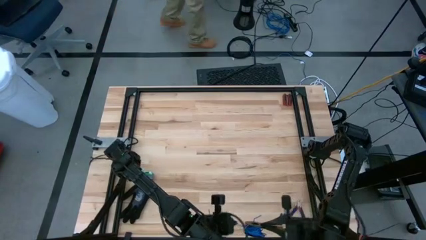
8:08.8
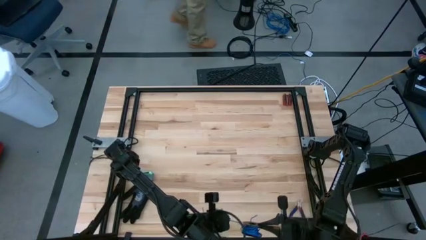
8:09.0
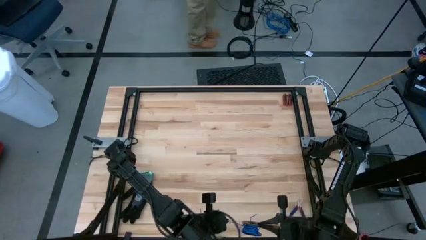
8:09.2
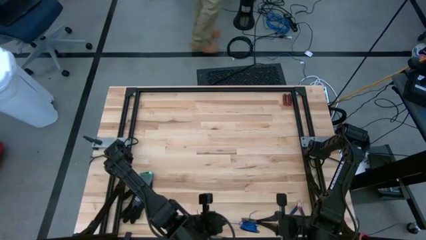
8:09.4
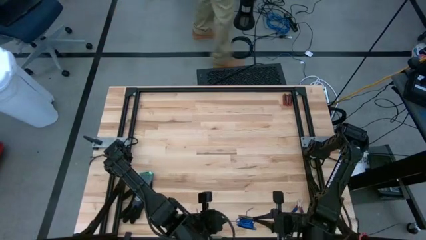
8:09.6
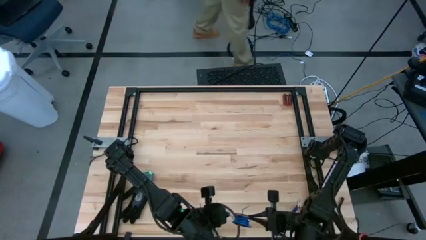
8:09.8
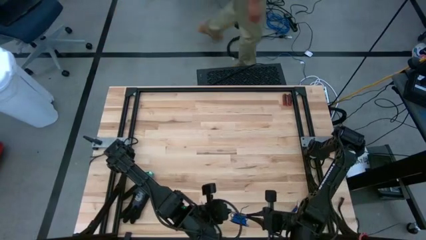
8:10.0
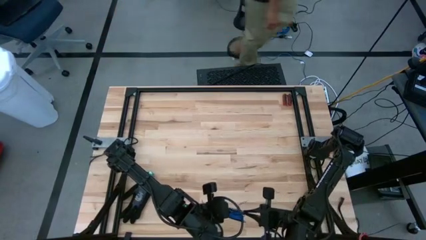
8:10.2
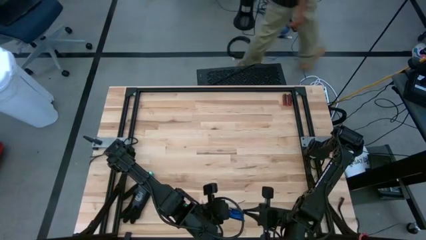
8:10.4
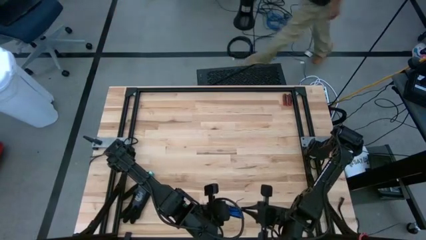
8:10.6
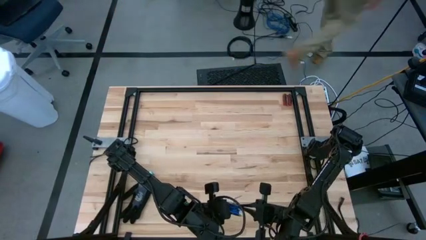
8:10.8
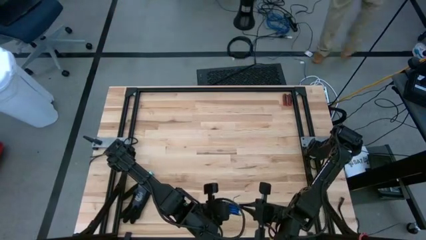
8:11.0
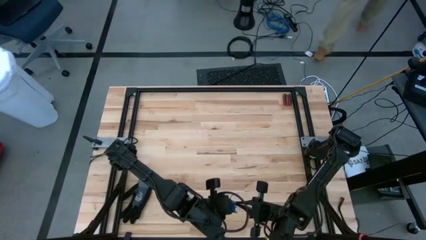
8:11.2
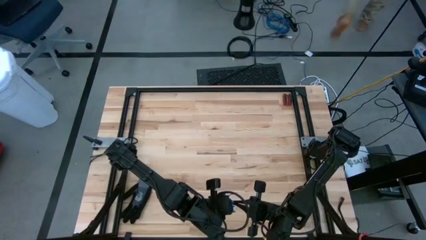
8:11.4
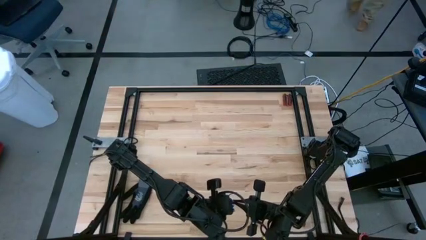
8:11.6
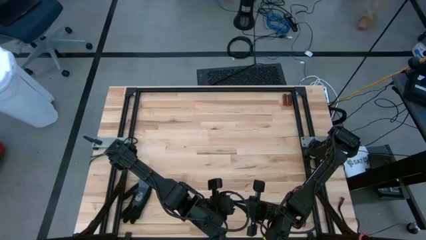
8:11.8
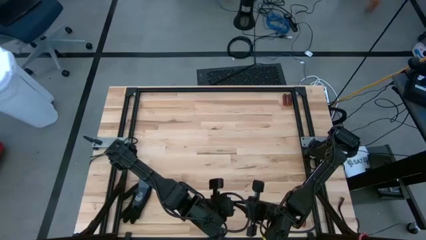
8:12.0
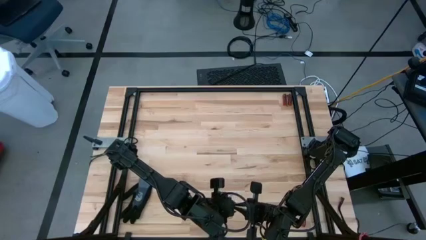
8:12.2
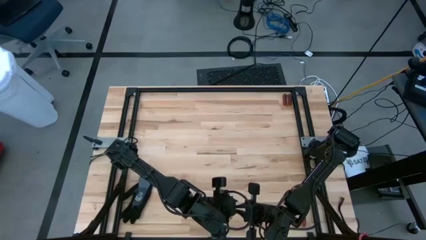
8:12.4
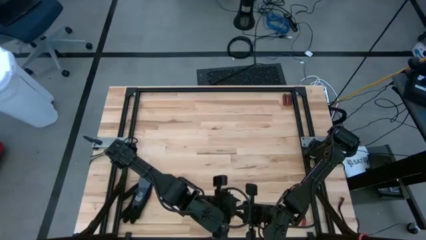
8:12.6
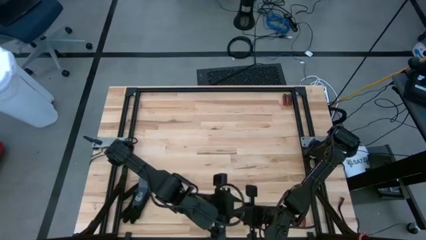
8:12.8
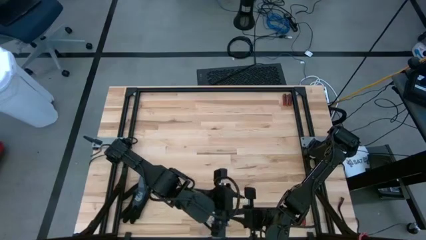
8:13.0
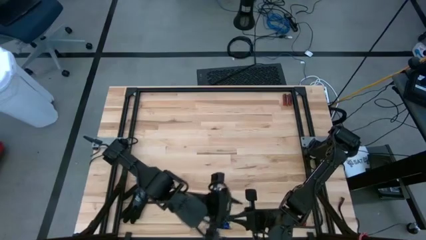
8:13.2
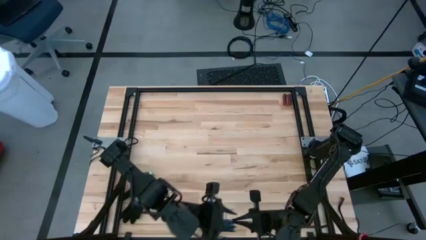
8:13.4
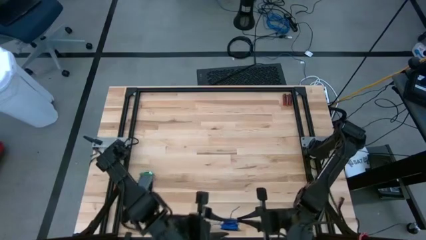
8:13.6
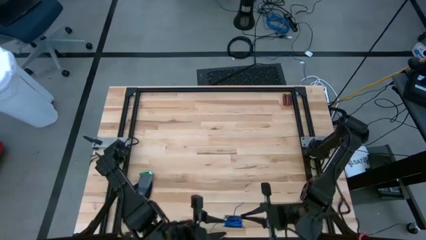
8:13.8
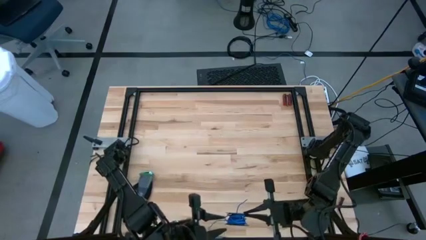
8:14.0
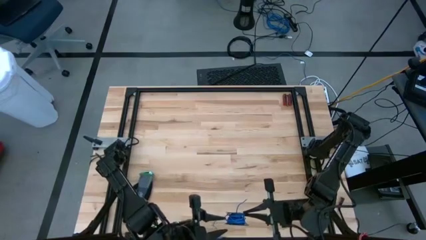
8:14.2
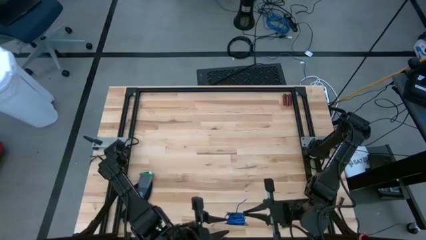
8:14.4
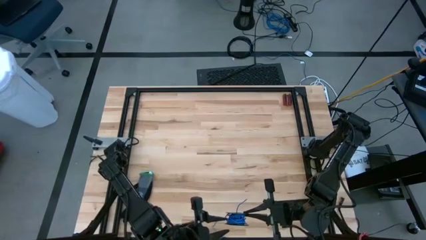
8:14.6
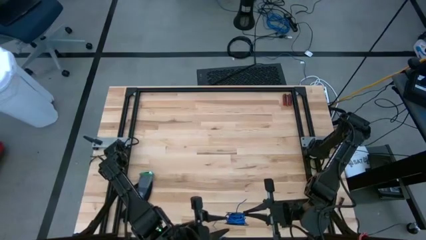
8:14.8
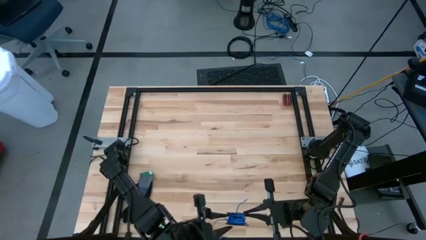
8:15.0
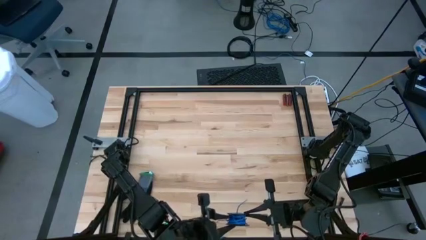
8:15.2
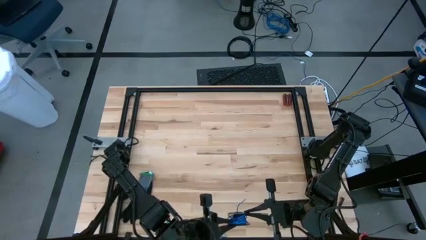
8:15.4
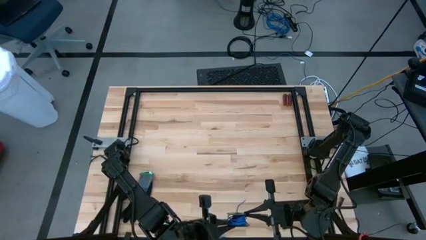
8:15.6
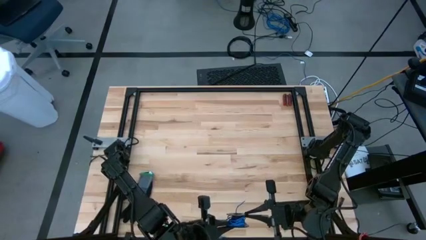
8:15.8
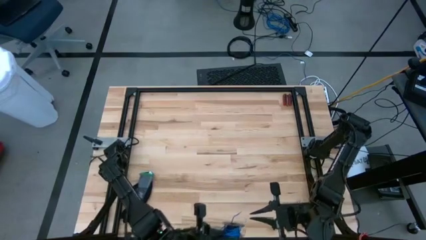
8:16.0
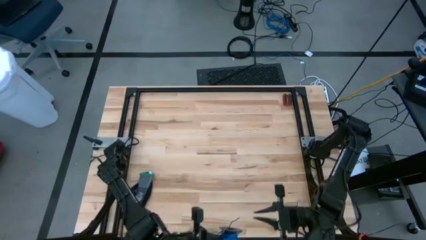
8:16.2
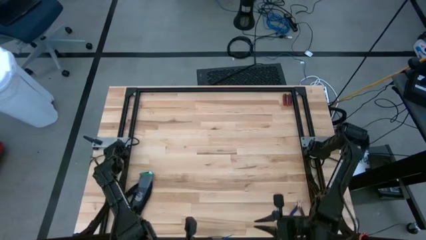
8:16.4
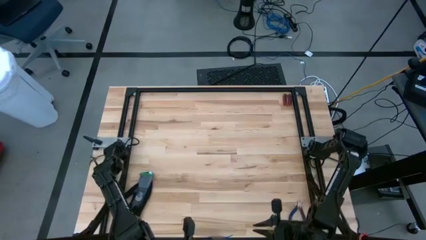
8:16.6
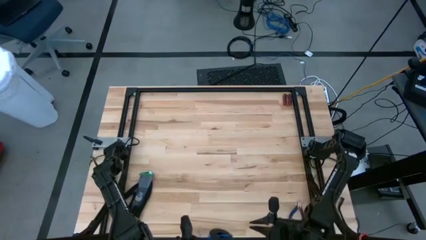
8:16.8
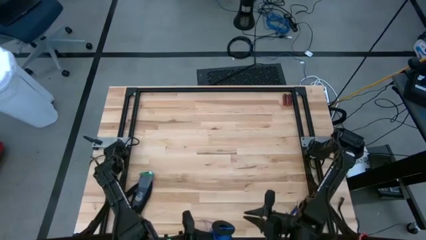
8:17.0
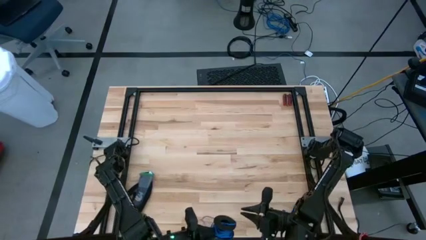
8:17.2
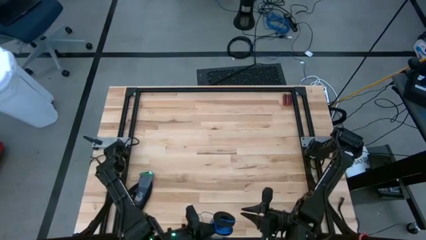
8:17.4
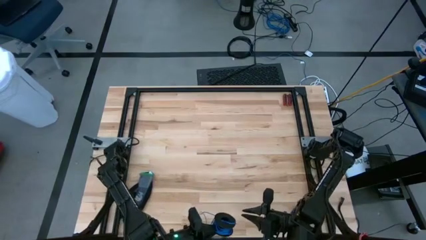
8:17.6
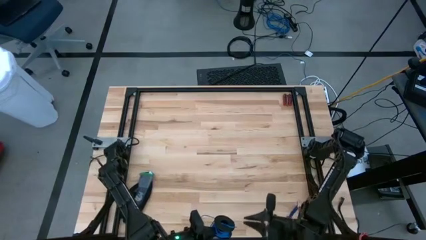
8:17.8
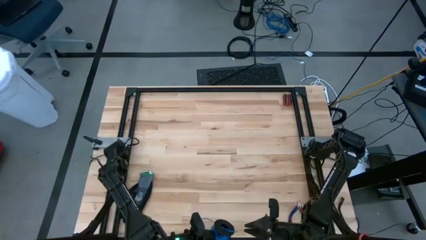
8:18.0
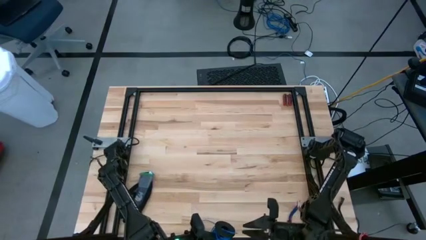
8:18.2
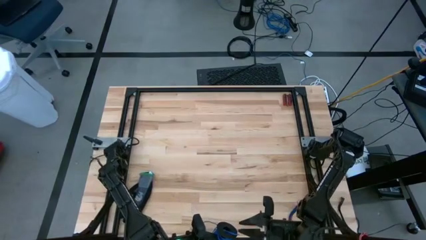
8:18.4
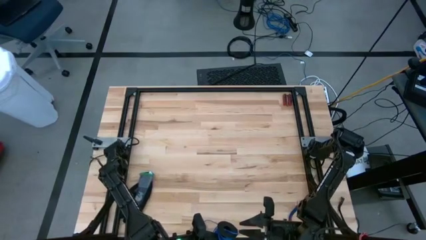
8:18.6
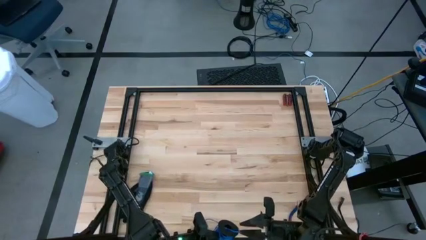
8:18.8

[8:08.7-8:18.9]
Task: Coil cords
Coil the blue wire onto the spool

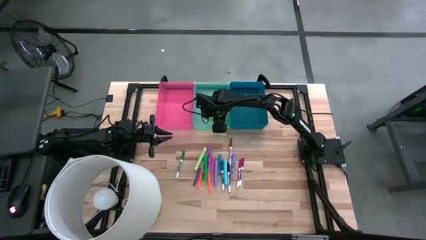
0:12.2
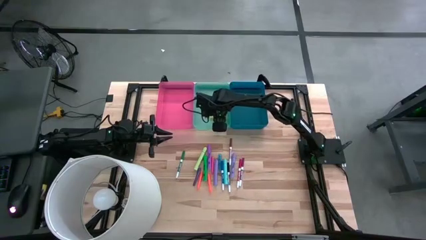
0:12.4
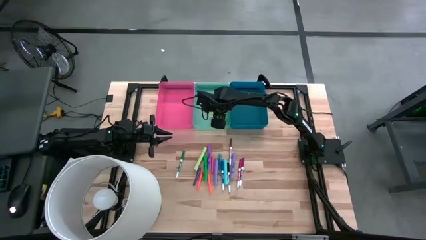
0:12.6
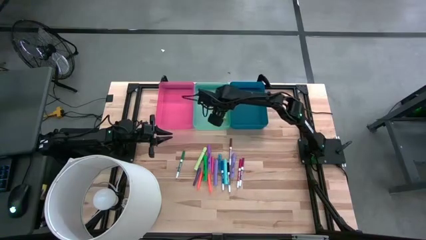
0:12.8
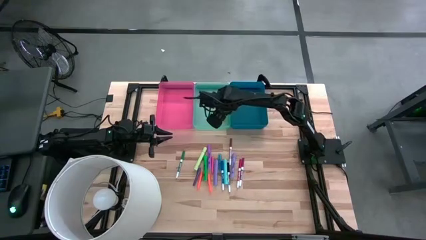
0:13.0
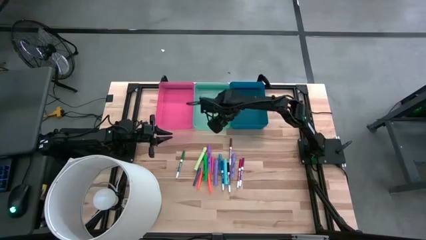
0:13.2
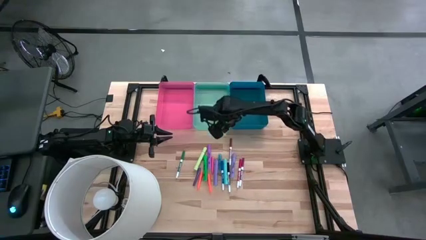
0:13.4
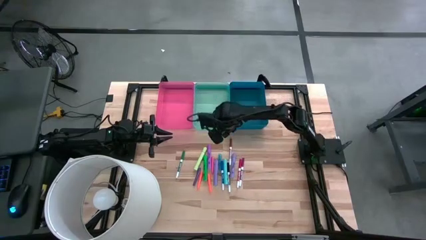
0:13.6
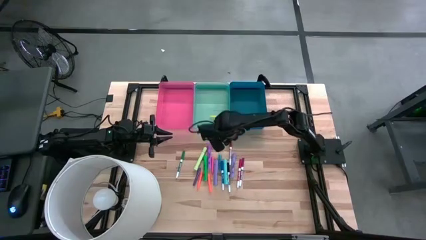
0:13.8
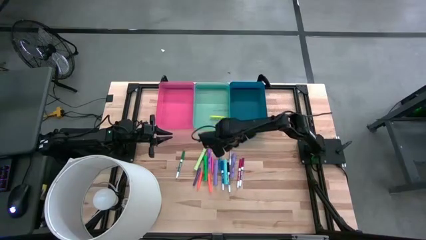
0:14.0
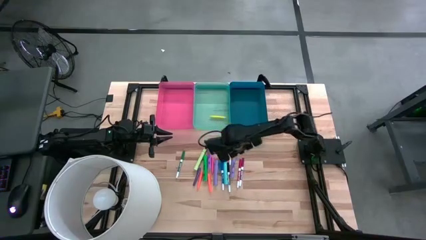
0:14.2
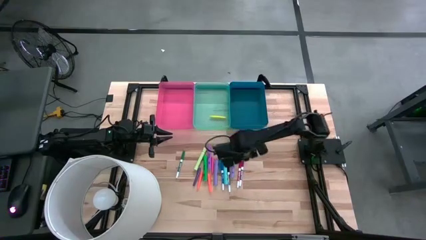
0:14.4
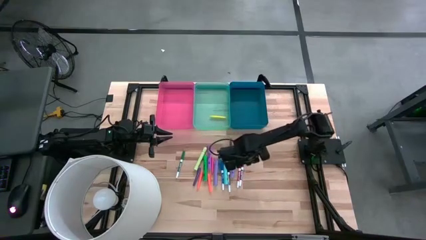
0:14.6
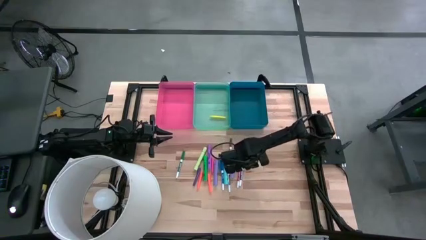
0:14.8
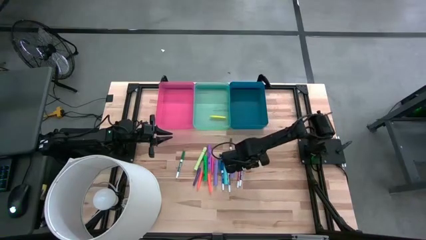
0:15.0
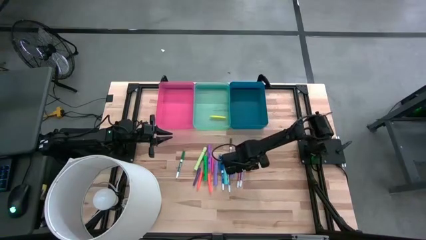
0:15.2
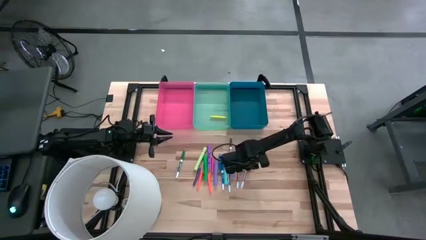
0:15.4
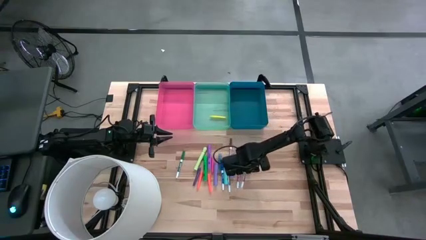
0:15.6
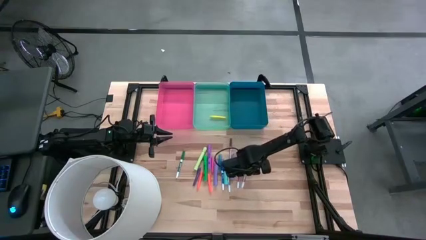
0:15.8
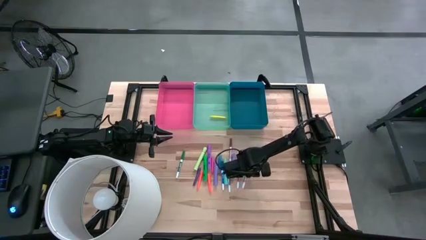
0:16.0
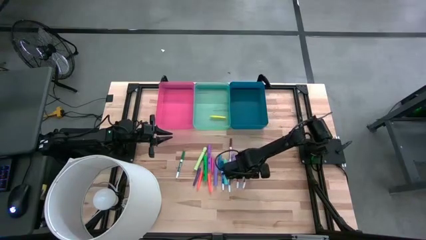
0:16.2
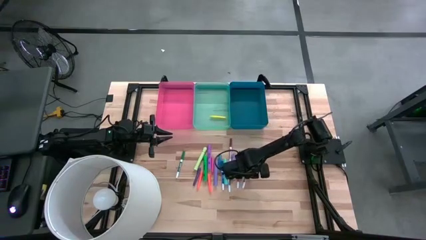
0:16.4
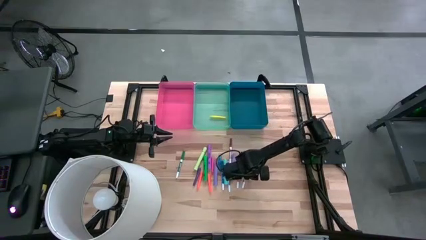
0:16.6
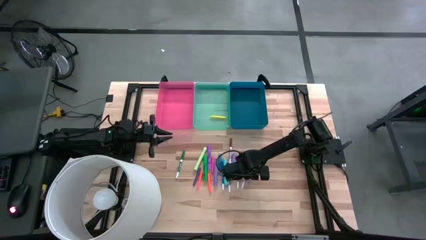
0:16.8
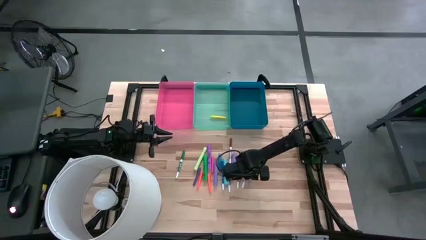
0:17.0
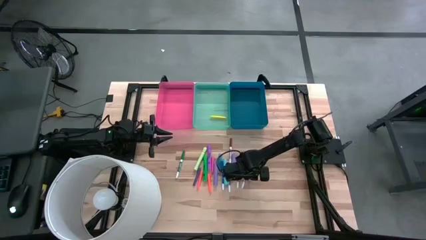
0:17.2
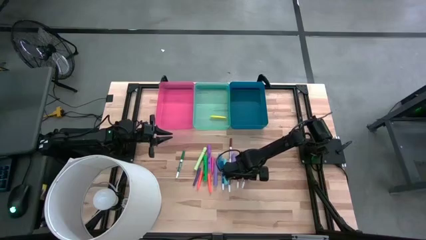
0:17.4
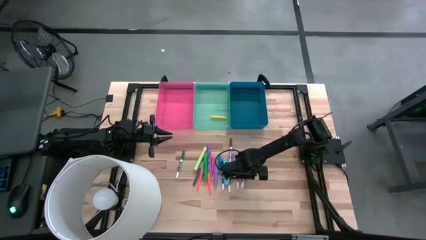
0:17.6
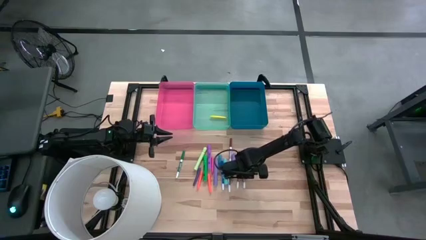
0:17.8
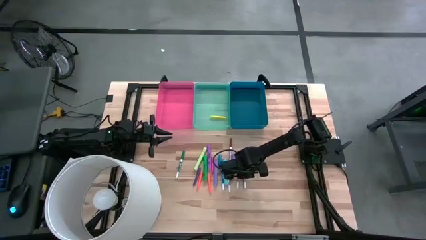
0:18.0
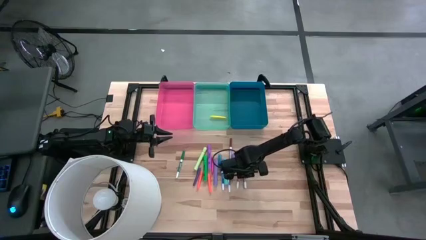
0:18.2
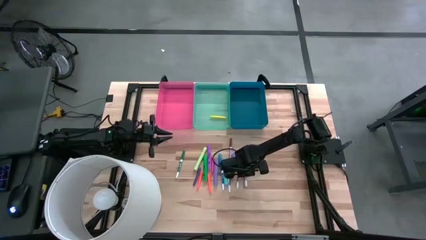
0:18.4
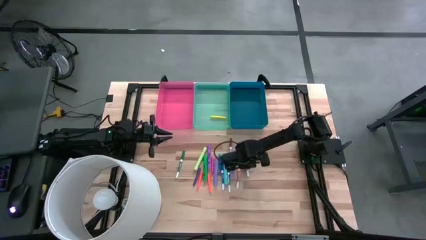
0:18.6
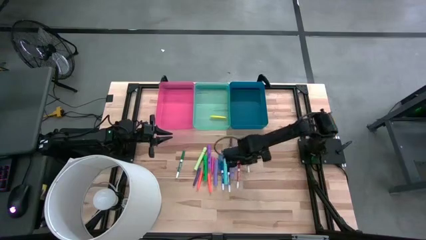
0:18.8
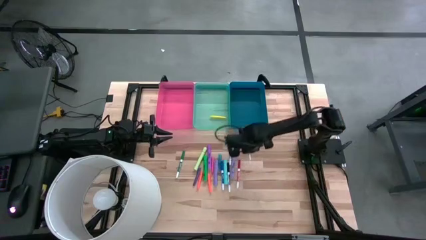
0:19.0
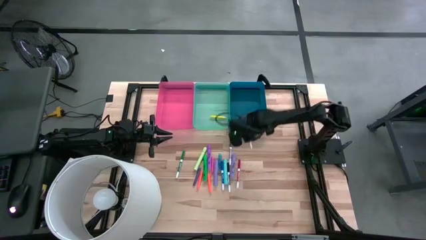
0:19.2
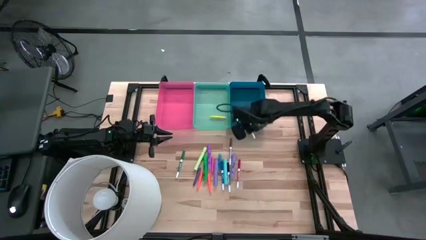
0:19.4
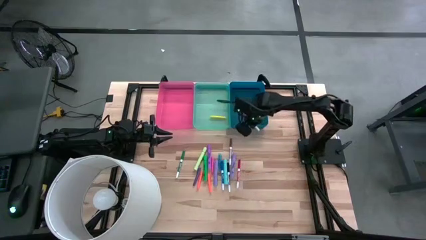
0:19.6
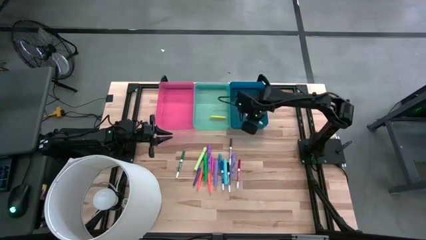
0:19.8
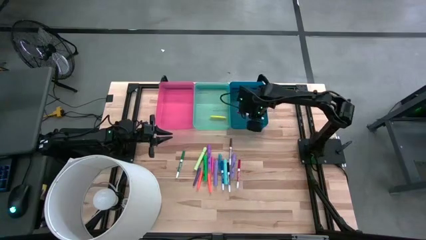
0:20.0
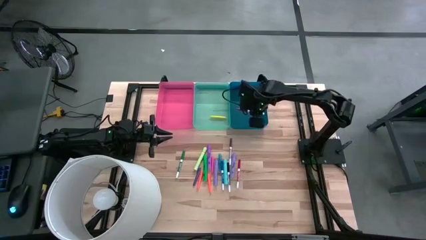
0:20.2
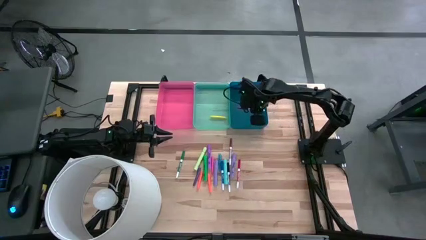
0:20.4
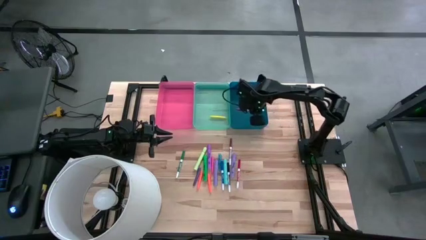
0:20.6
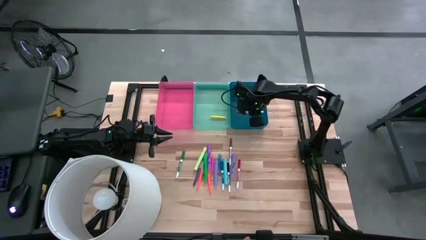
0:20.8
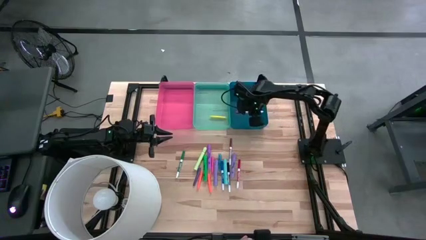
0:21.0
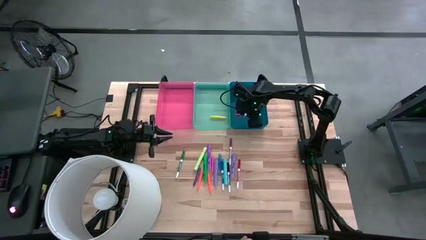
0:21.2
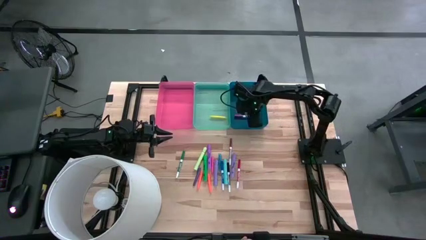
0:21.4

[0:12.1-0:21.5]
Task: Pick & Place Markers
Put the dark pink highlighter into the blue bin
